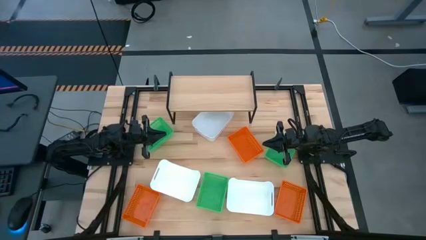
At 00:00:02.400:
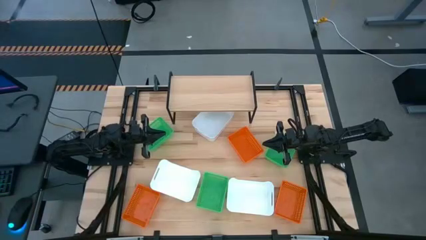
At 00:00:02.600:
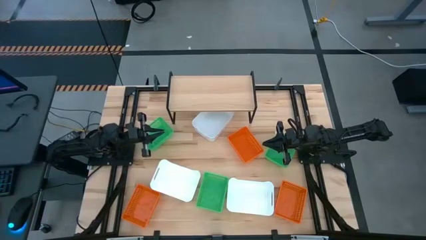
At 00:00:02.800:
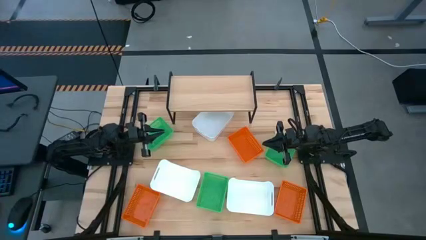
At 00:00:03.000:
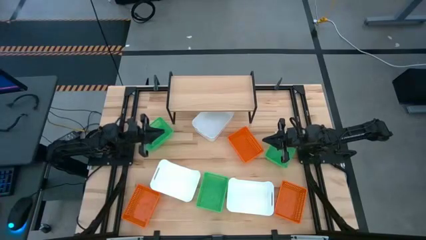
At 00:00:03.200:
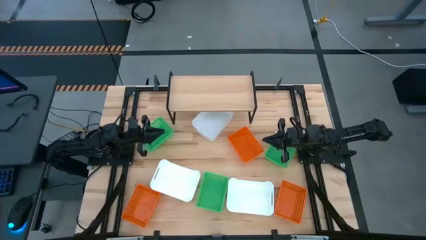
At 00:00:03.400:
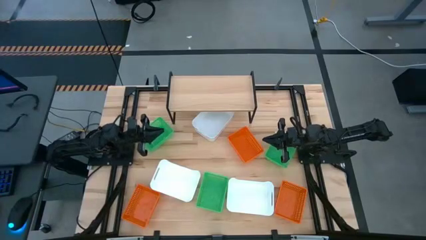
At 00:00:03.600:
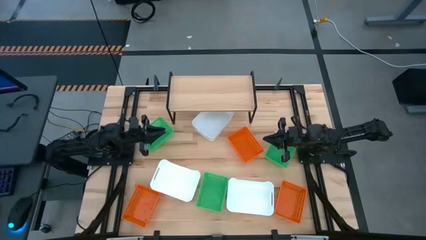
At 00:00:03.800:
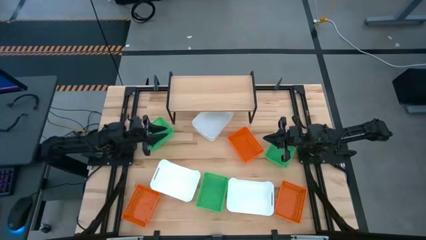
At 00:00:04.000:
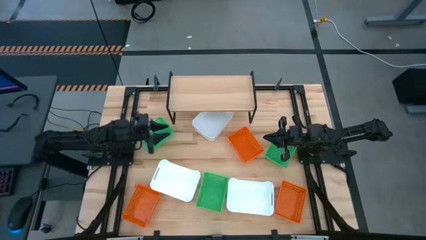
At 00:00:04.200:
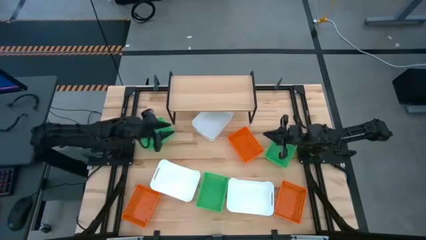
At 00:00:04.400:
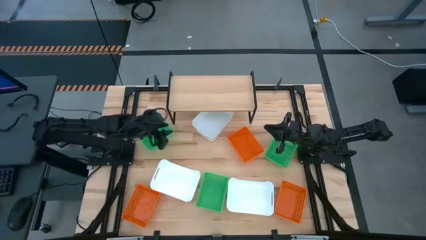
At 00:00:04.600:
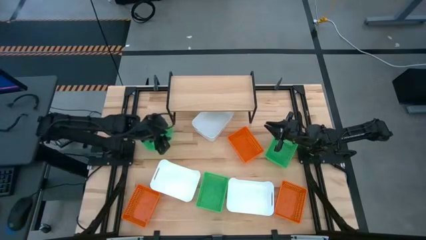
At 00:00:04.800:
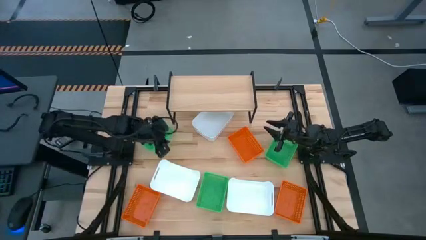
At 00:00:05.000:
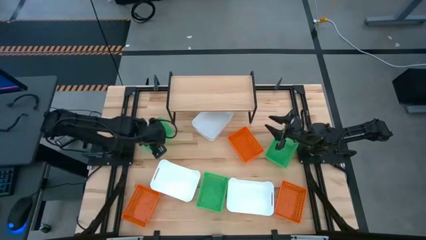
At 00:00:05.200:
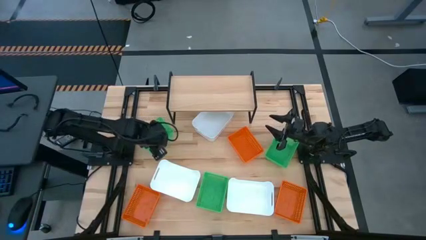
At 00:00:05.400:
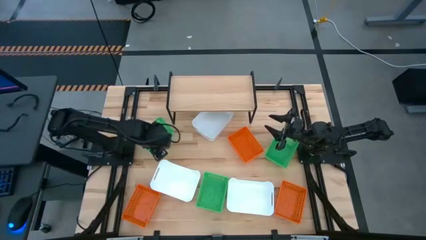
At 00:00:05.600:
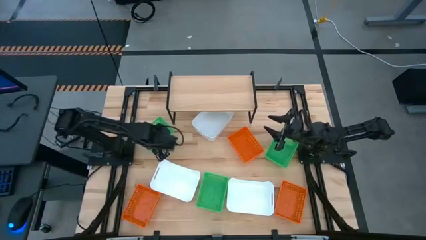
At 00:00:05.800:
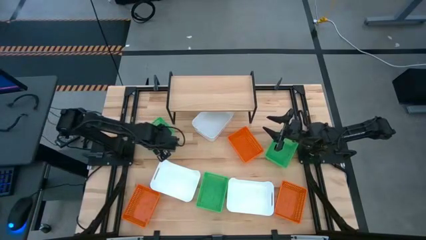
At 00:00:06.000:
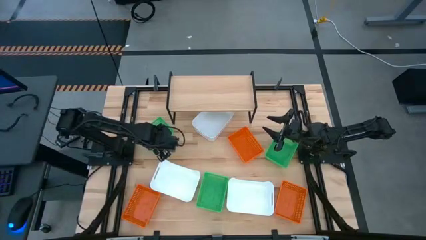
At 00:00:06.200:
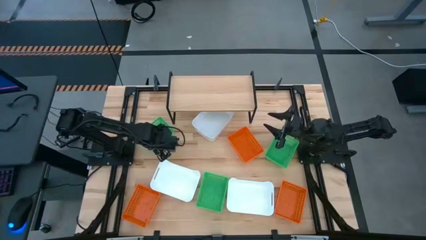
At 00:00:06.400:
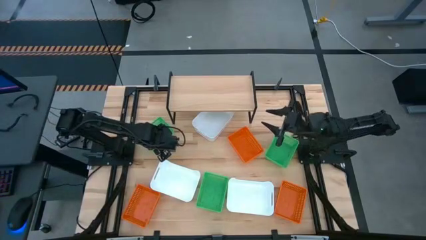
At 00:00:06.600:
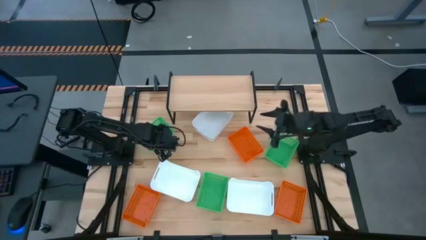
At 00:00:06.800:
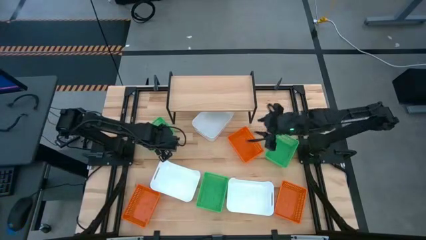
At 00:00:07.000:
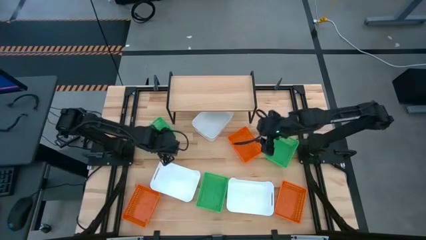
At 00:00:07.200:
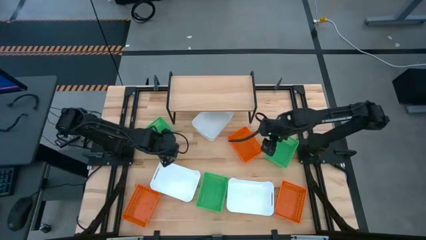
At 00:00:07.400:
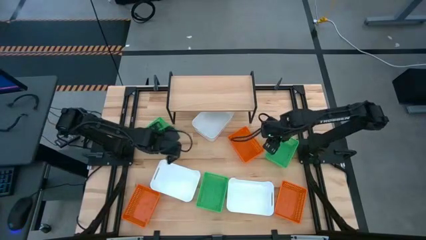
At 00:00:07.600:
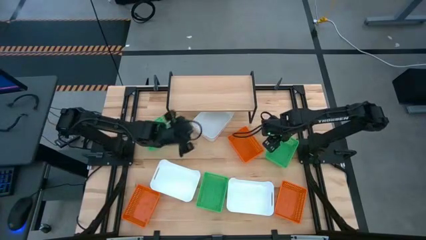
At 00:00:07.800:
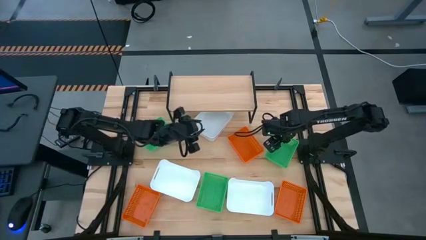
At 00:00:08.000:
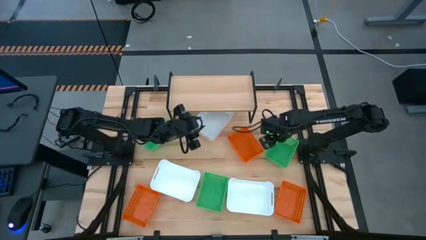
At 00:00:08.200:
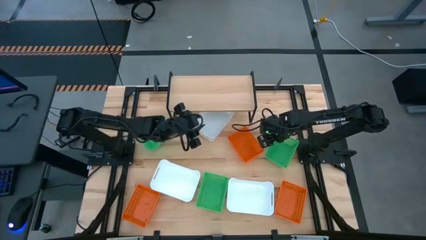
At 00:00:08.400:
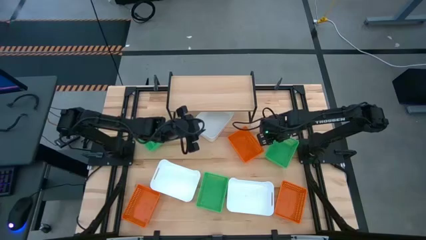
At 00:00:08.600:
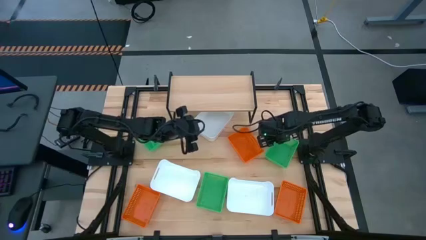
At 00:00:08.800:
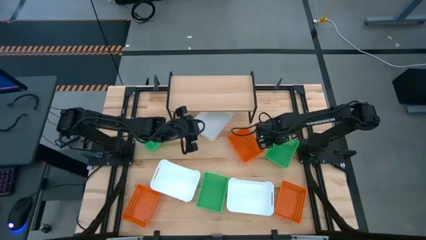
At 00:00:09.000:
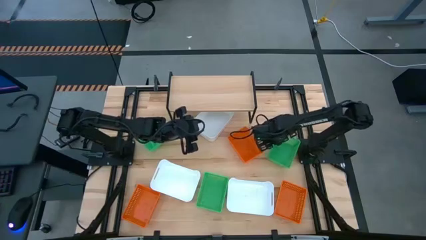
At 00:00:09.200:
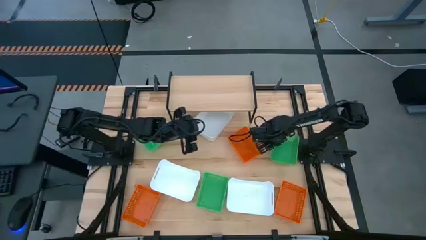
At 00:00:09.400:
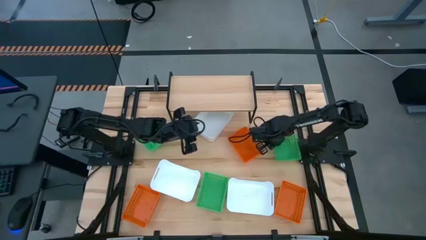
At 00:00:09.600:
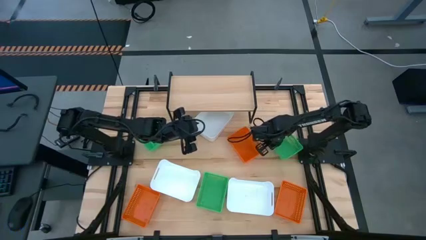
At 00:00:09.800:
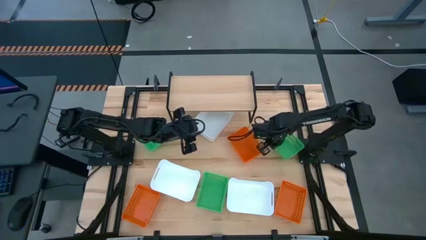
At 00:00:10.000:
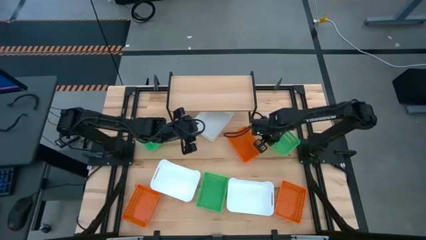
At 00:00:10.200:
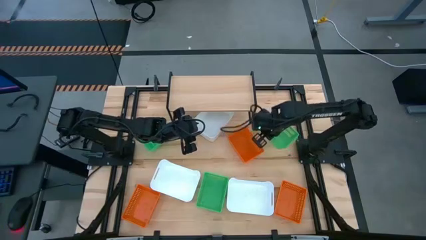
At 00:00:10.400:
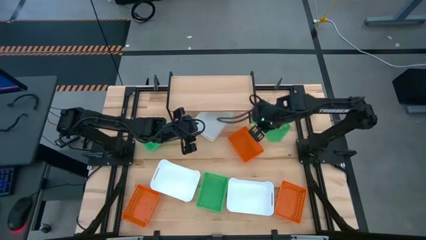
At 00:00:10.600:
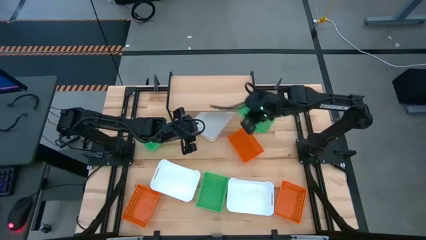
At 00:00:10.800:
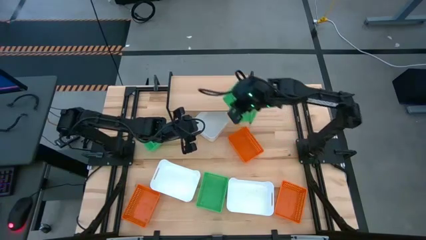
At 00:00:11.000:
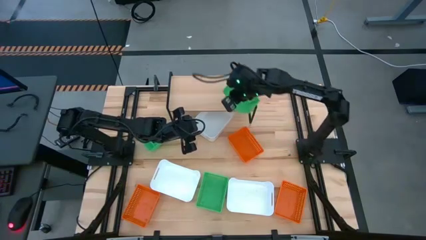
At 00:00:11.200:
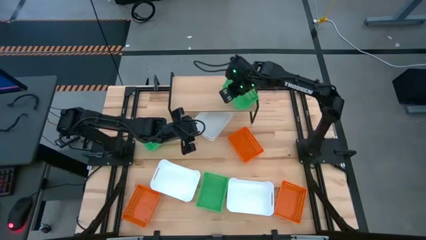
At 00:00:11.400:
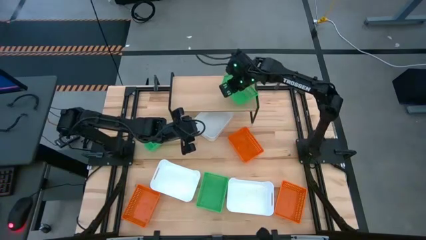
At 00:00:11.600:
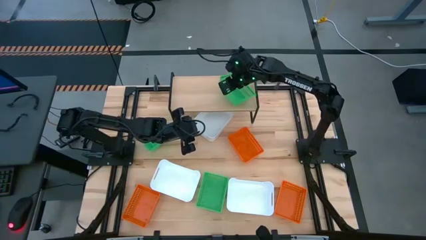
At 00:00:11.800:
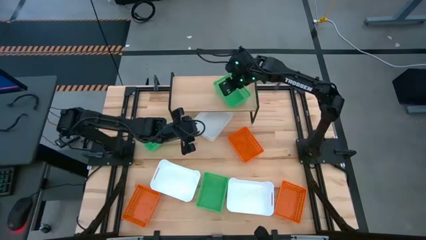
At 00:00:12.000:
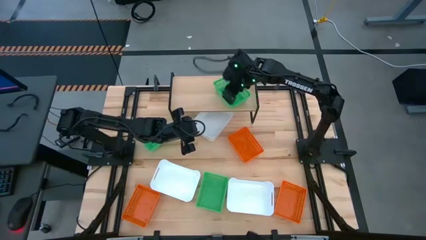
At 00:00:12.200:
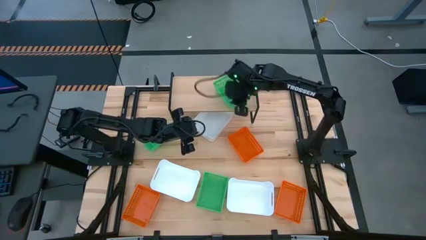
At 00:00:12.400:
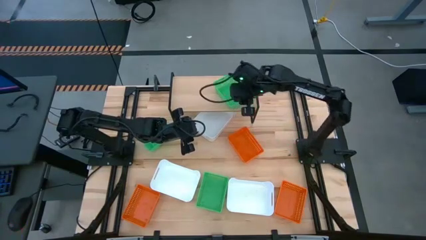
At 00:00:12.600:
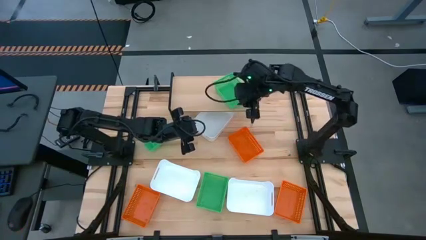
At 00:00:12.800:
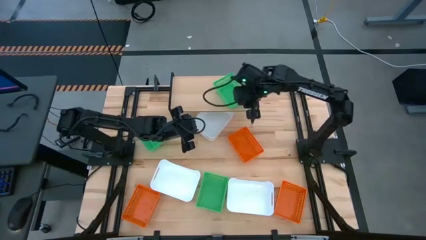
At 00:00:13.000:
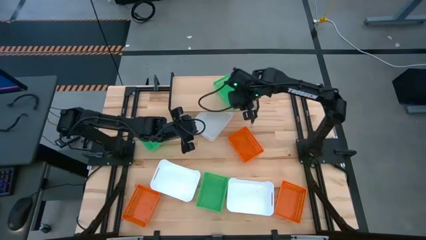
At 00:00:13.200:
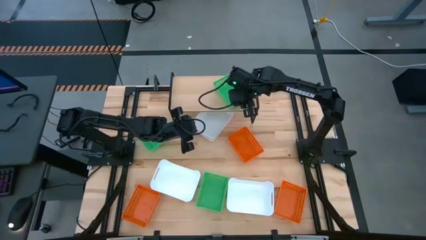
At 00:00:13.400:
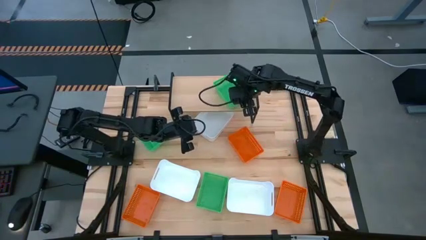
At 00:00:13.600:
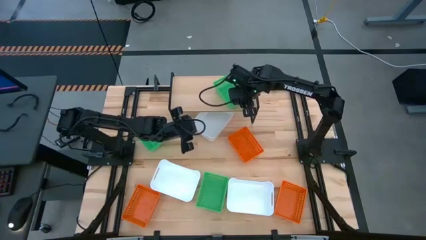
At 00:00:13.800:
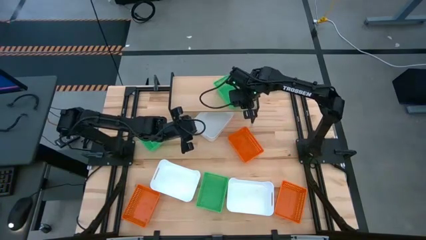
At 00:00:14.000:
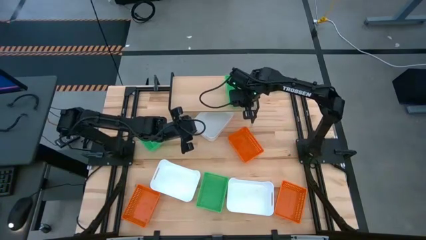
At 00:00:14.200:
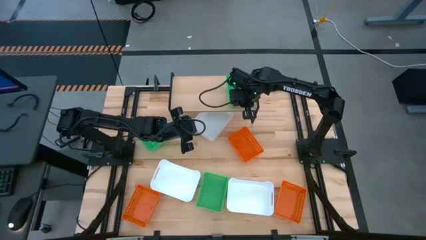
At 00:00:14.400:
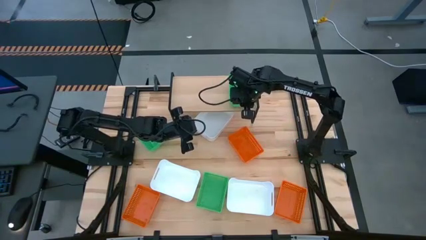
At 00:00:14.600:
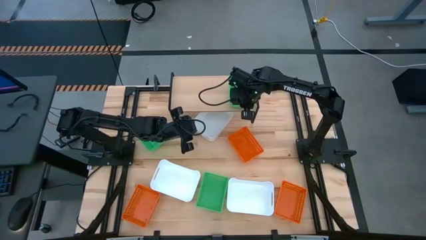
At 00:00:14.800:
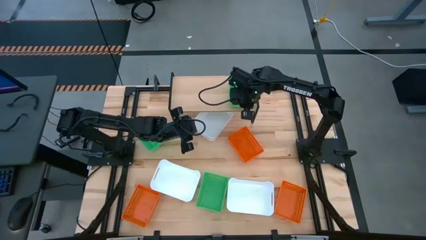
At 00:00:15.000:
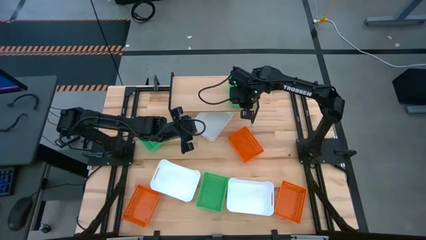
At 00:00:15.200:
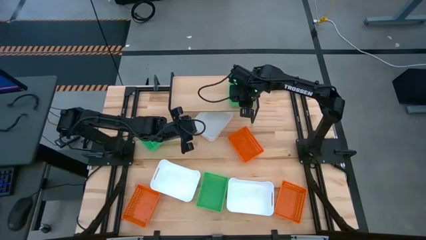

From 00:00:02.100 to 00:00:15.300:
Task: Stack baskets on shelf by color
Put the right green bin on the shelf
